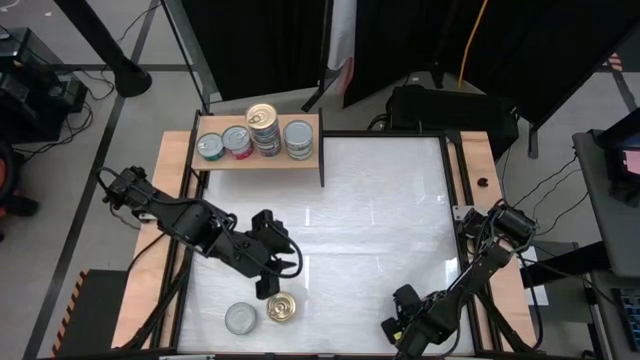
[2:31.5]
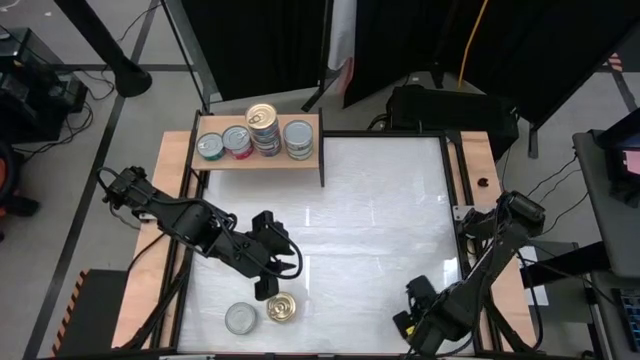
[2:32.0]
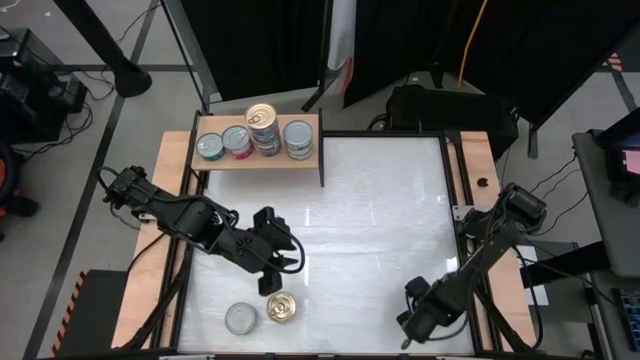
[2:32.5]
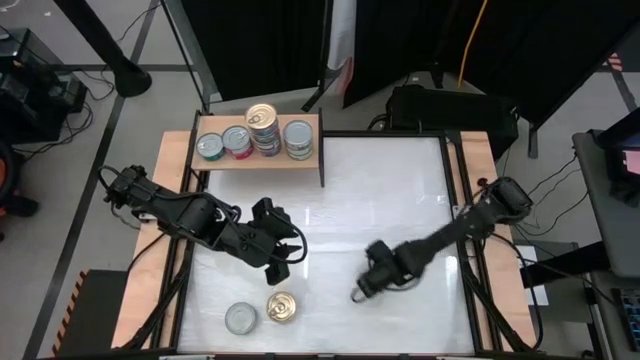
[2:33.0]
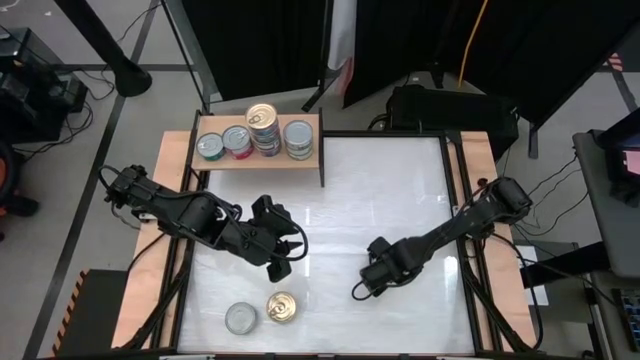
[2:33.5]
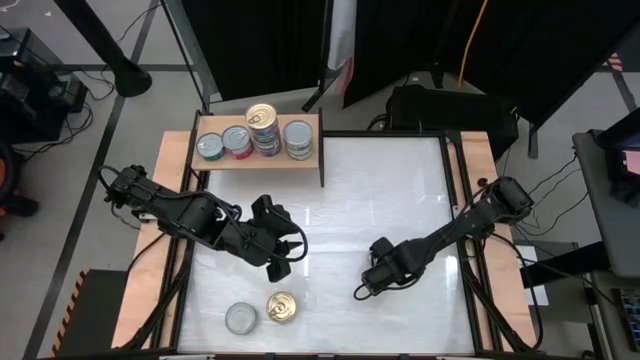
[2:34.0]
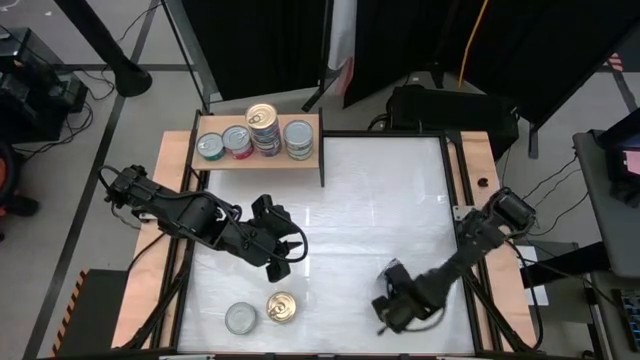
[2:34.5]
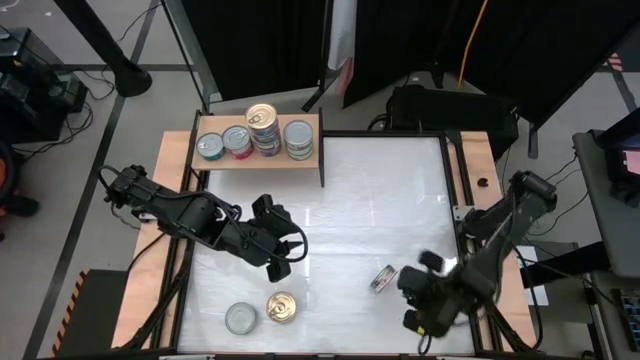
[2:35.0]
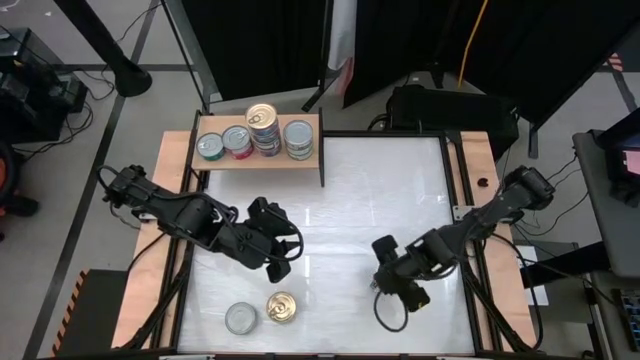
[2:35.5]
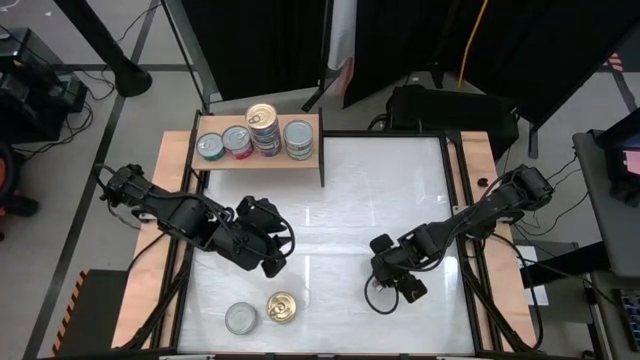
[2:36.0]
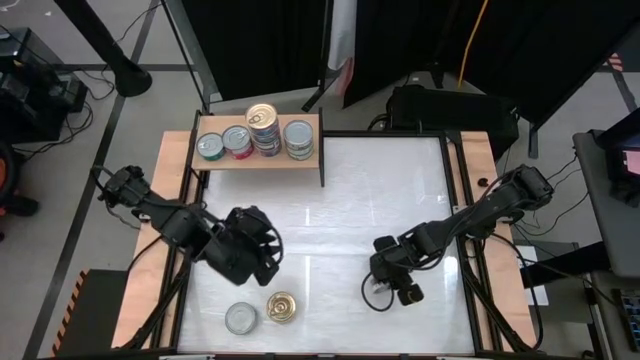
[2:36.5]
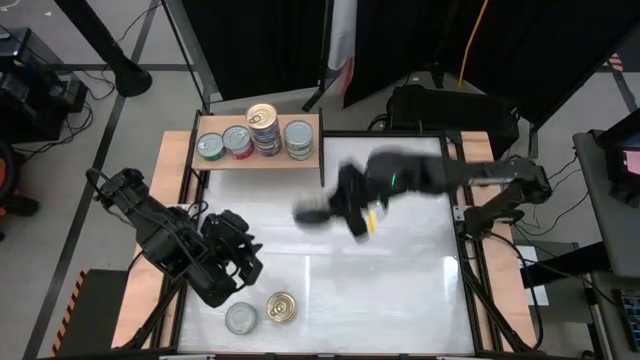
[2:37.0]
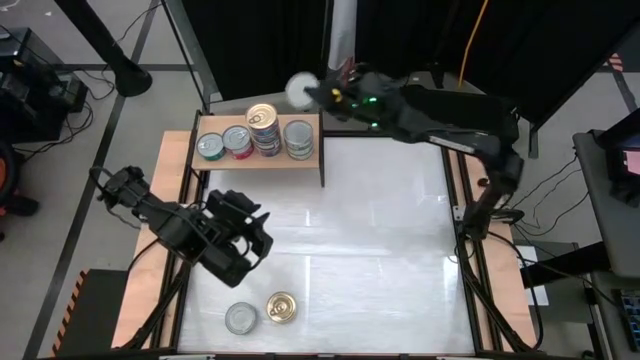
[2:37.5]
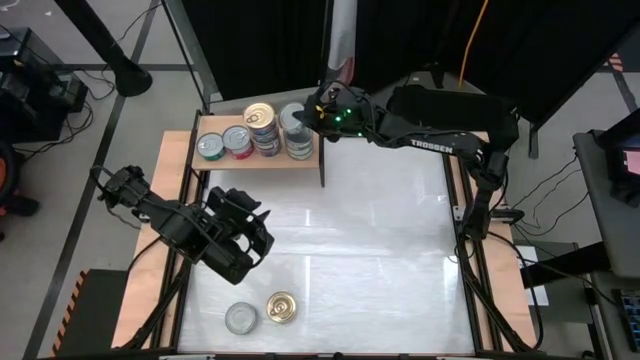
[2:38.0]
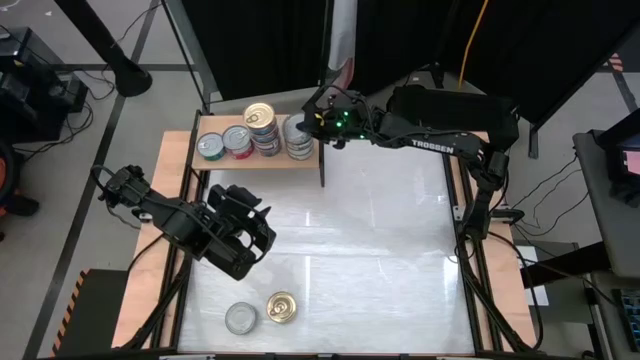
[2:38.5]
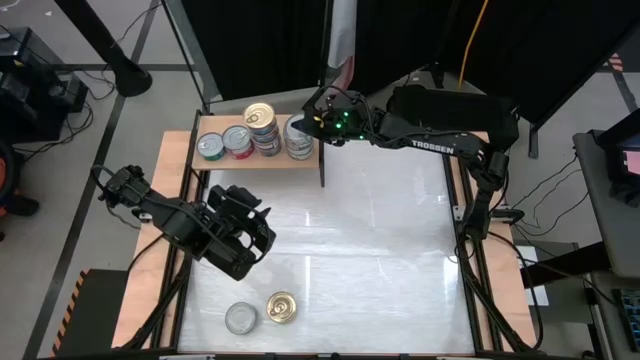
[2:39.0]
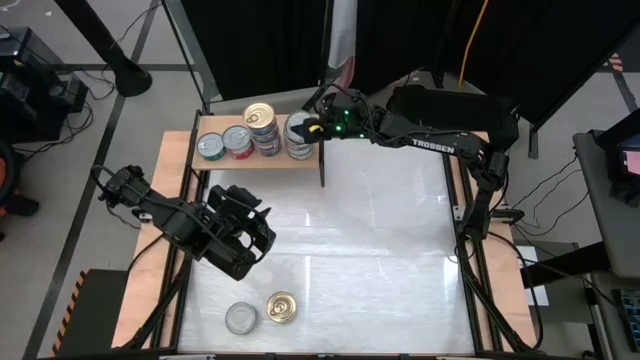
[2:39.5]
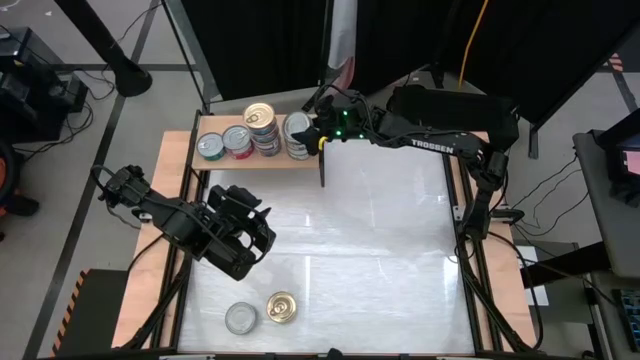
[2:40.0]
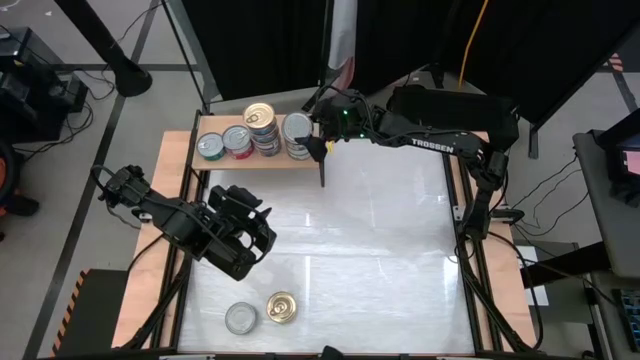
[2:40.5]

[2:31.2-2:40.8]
Task: Stack canned seafood by type on shelf
Stack the green white tuna can on top of the green white tuna cans on the shelf

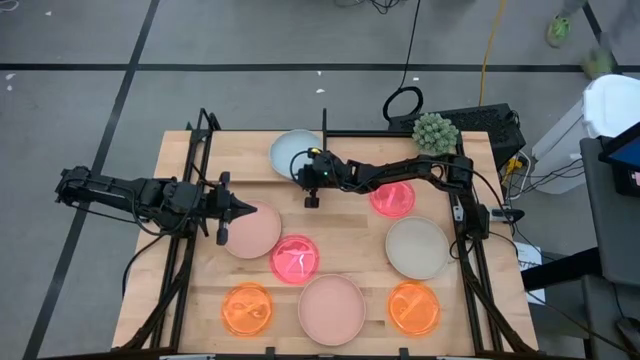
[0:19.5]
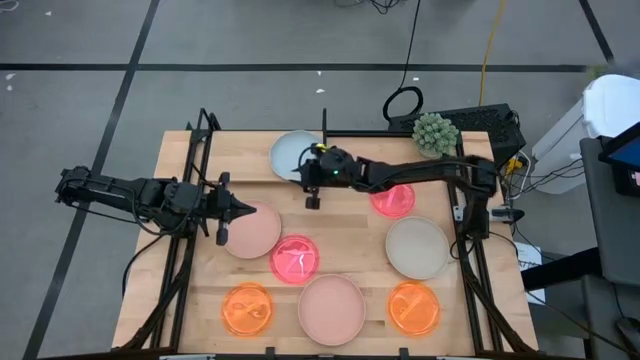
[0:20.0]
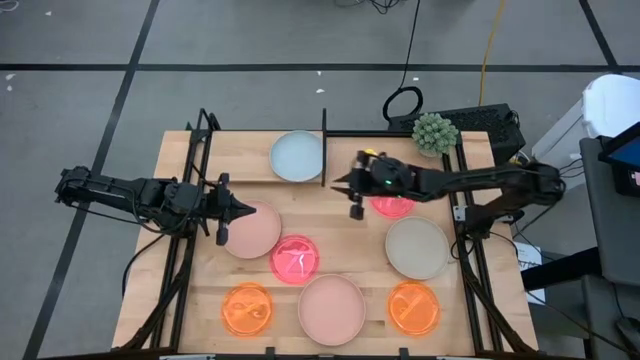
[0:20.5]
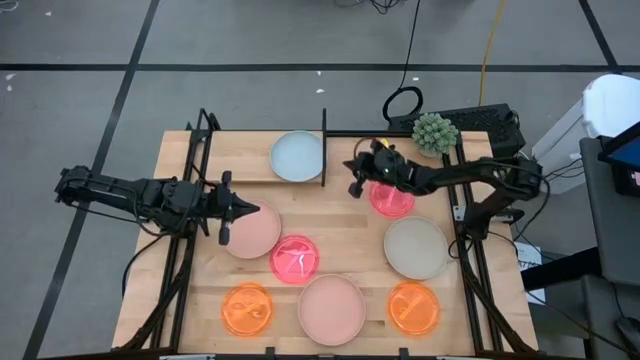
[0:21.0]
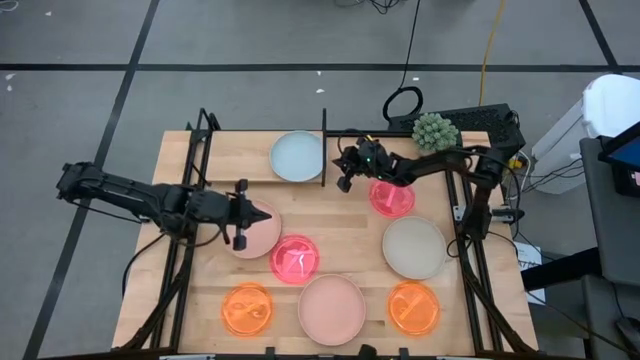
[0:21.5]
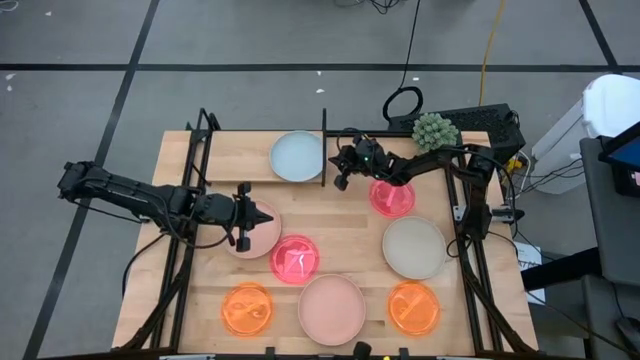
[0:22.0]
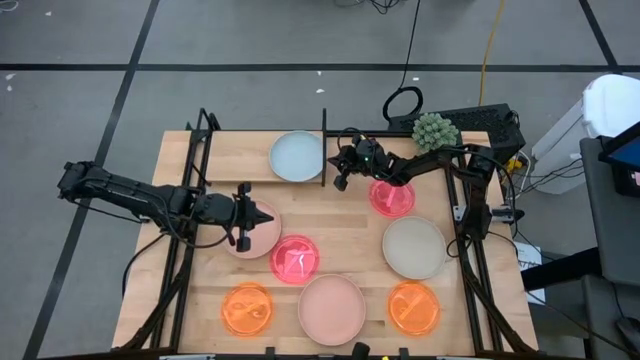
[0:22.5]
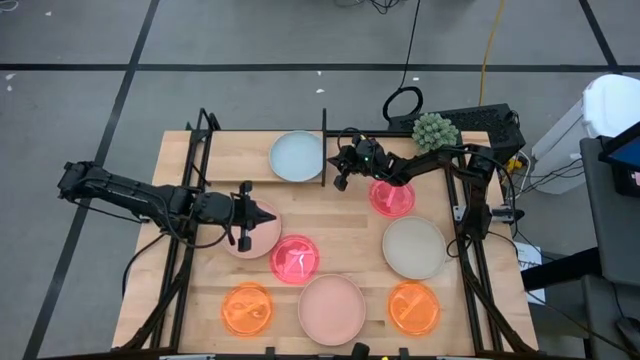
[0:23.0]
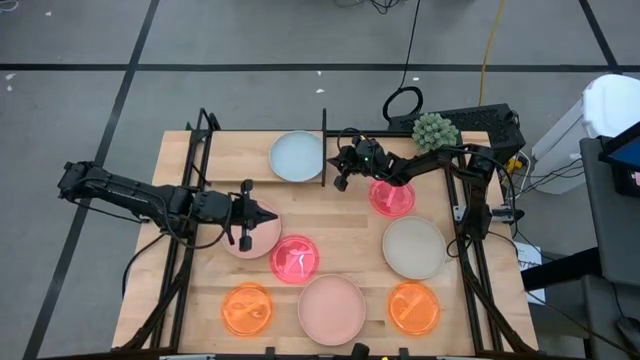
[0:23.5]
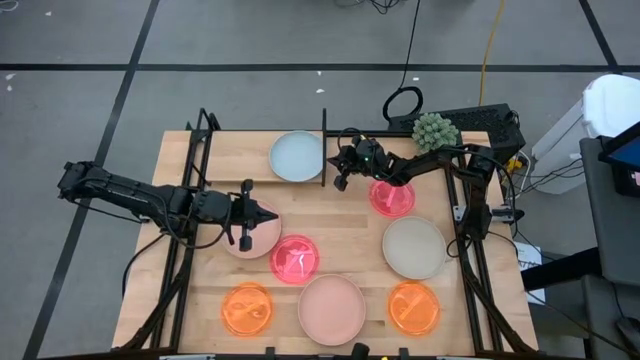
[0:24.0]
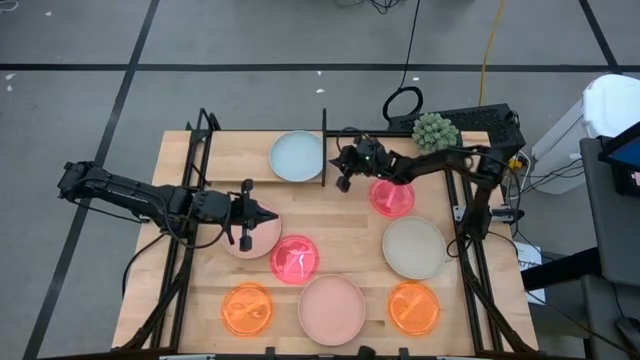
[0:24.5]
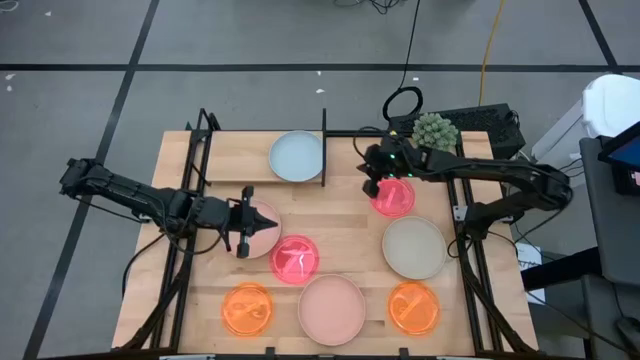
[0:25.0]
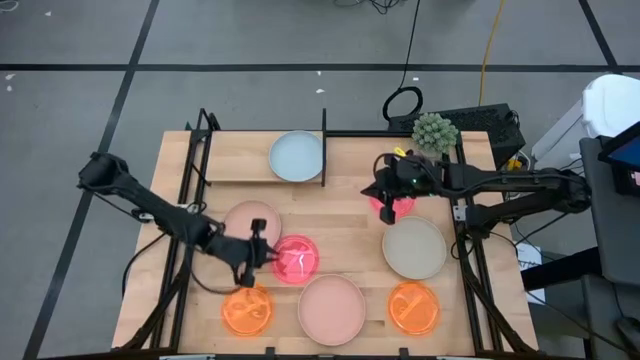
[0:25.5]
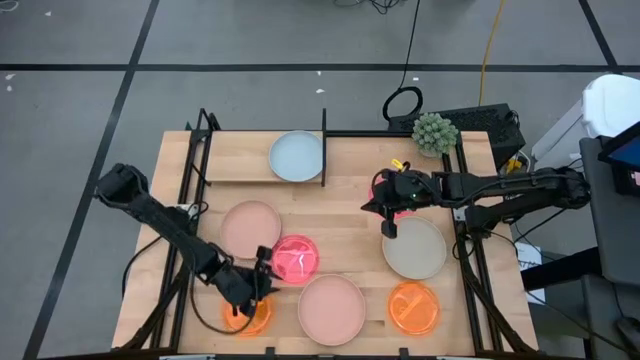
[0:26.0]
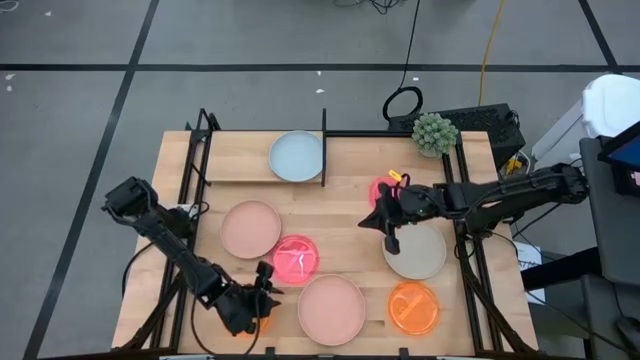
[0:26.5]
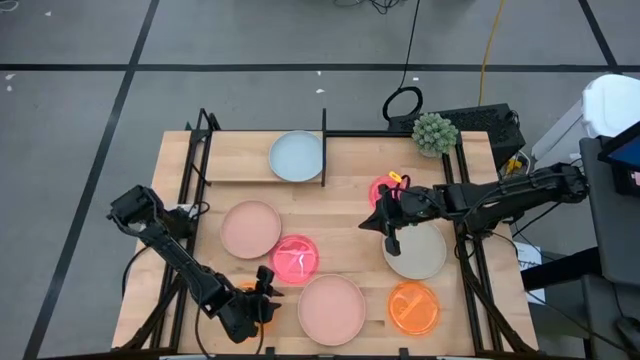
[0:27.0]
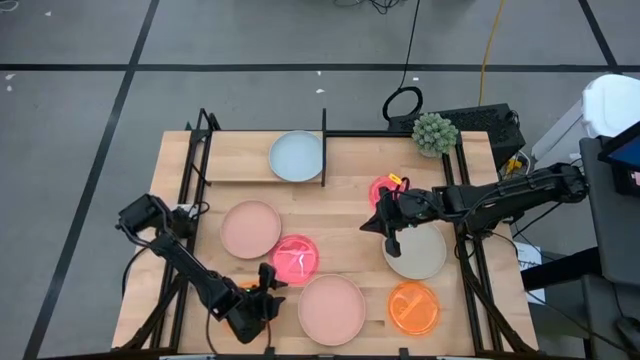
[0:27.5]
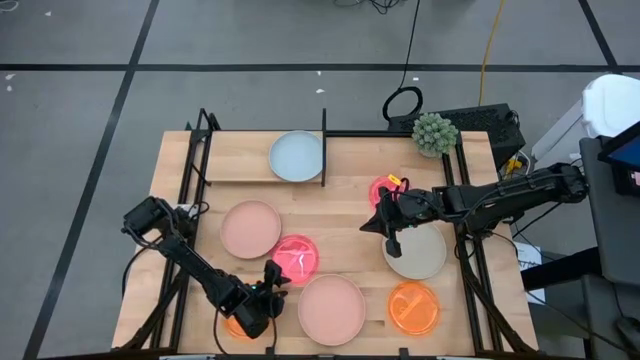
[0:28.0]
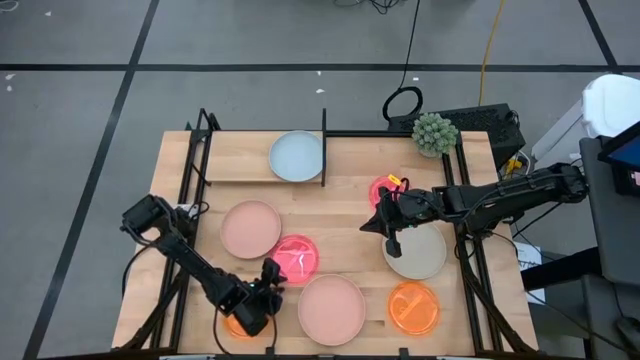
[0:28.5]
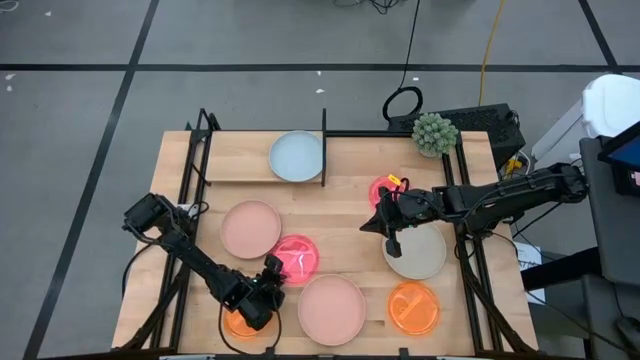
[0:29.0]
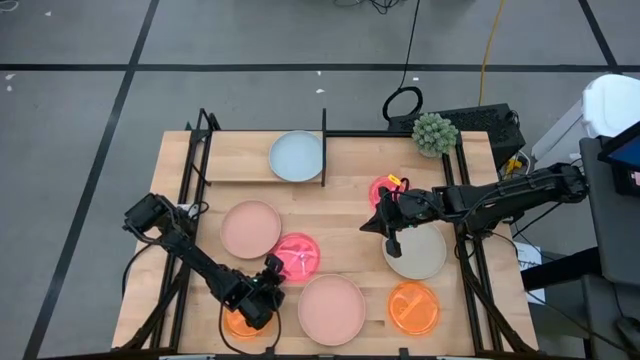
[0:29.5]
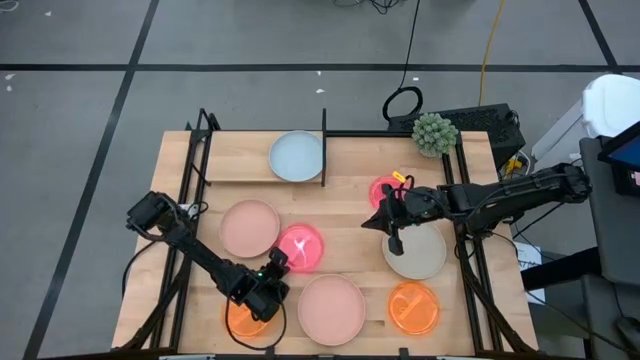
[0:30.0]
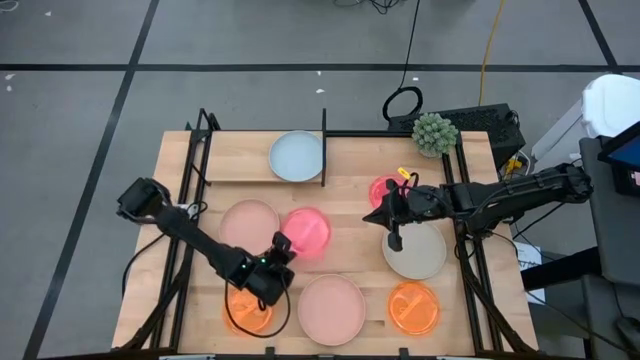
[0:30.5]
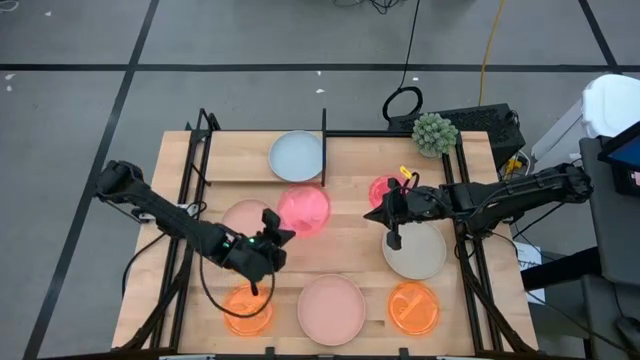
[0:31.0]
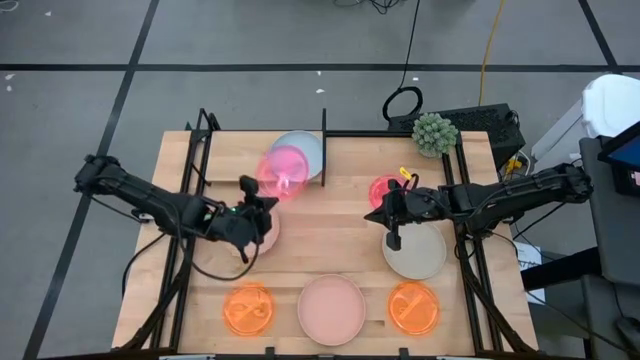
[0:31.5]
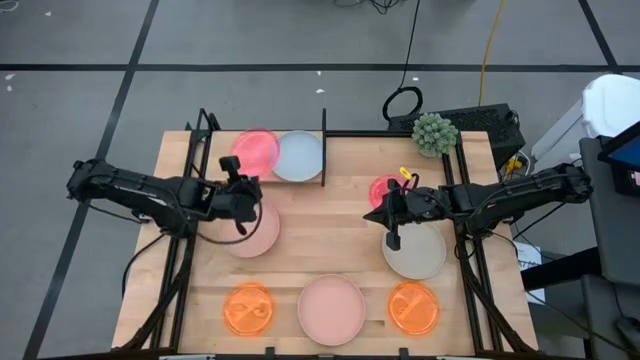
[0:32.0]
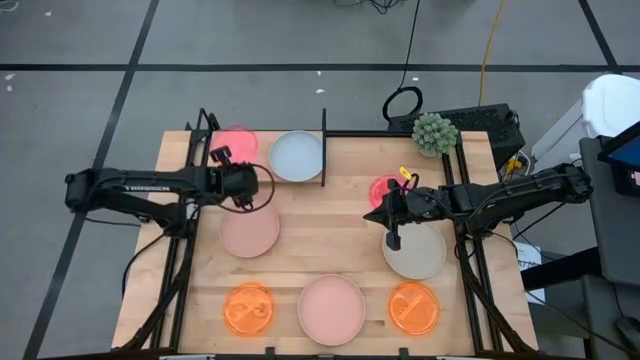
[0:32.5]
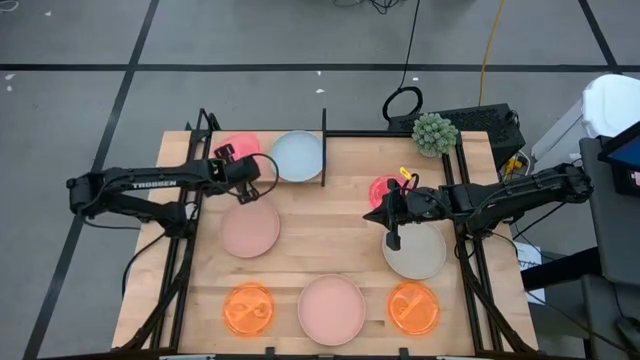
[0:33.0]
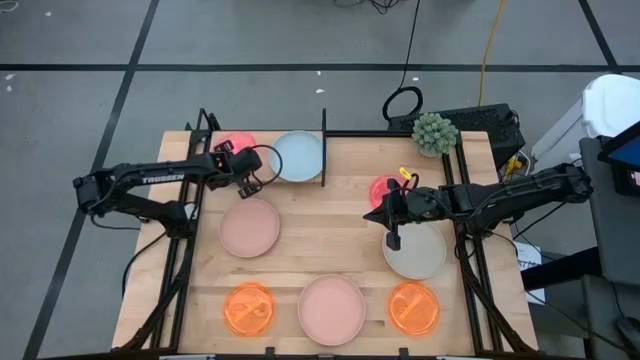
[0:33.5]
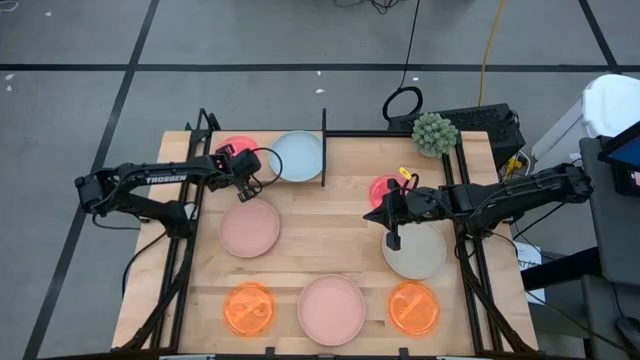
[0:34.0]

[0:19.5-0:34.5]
Task: Place and stack plates onto a shelf
Put the bottom pink transparent plate on the shelf
